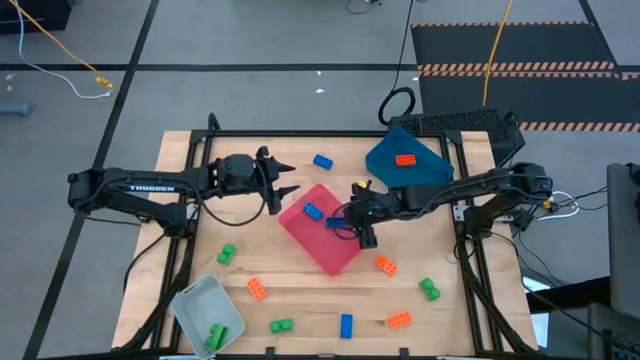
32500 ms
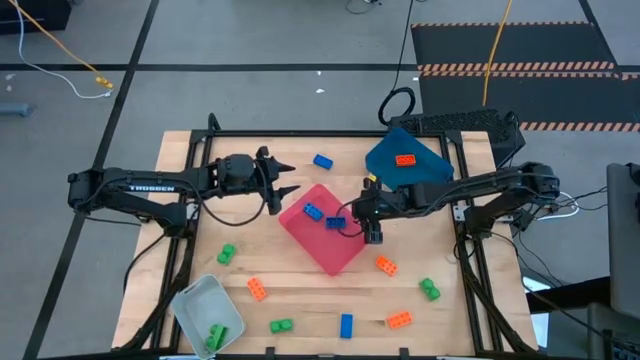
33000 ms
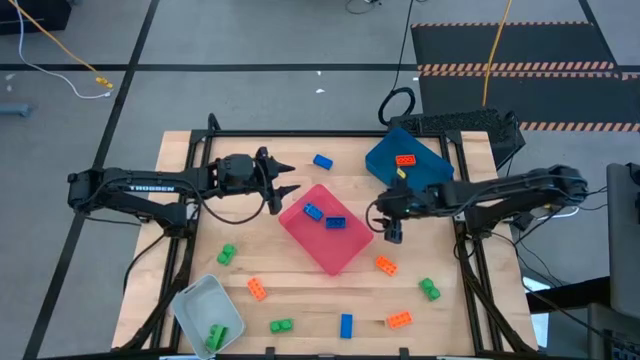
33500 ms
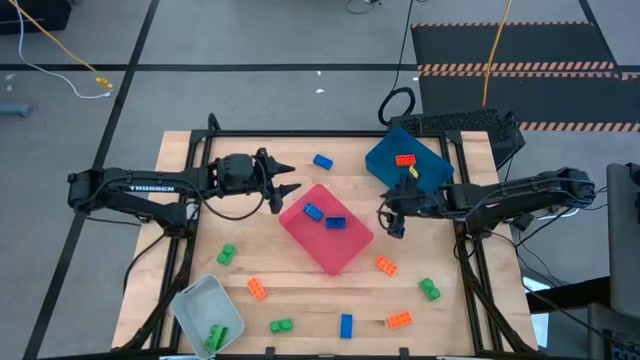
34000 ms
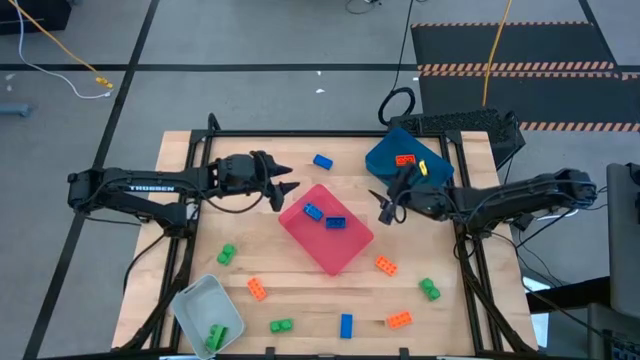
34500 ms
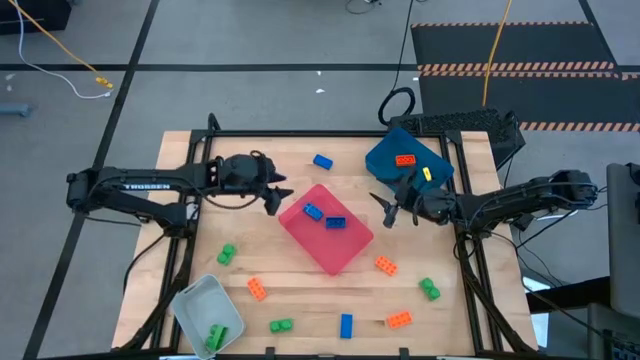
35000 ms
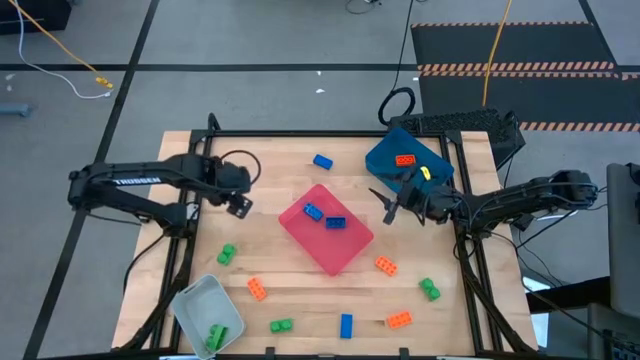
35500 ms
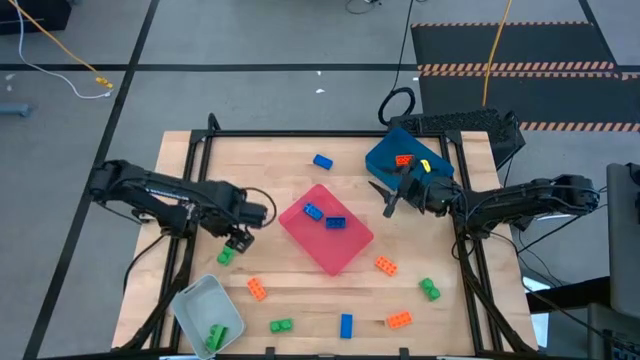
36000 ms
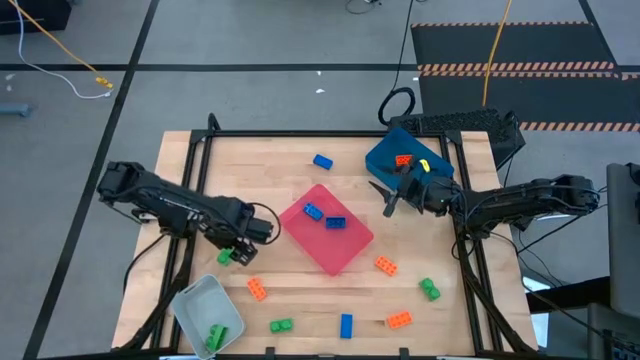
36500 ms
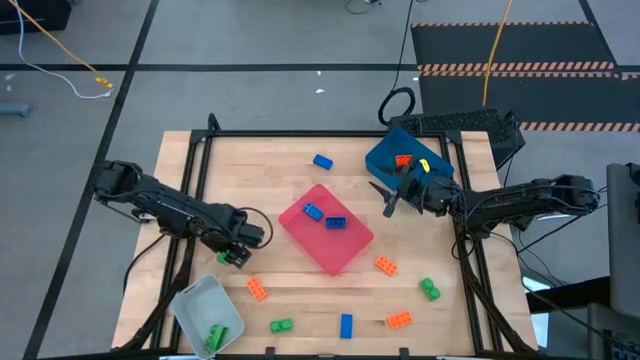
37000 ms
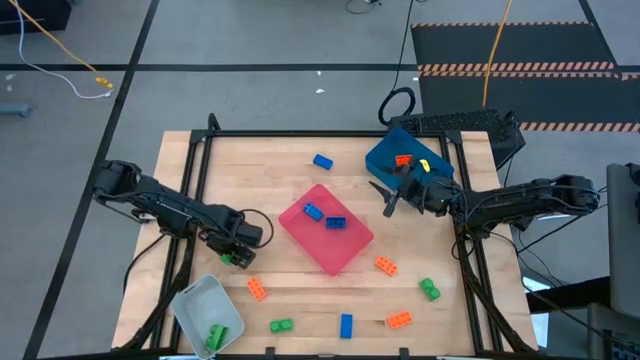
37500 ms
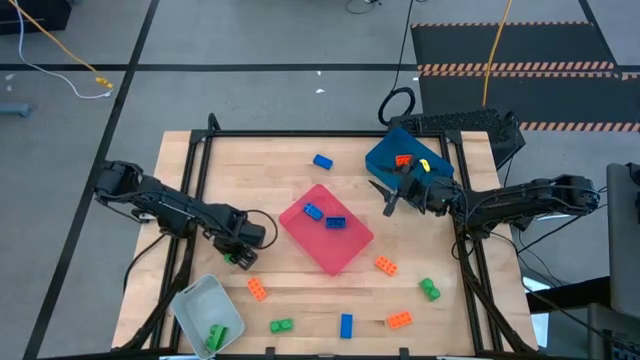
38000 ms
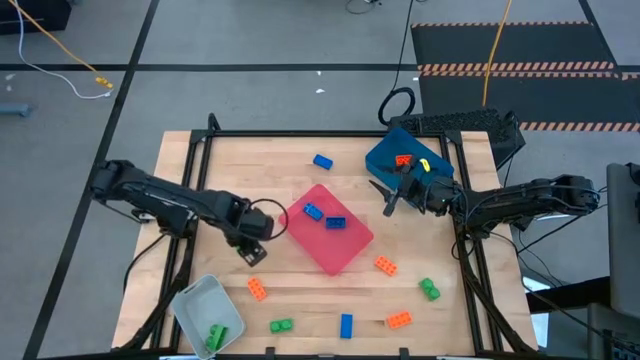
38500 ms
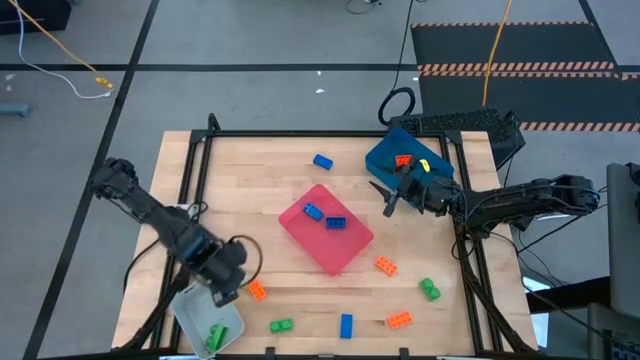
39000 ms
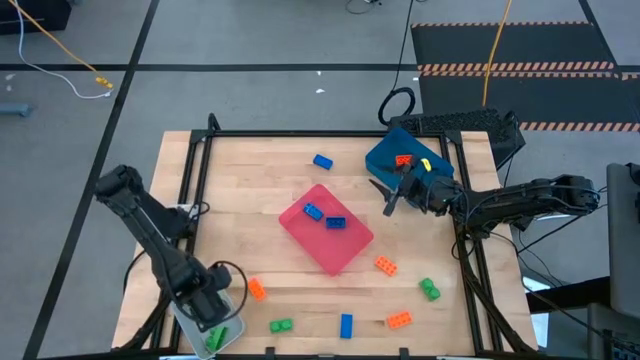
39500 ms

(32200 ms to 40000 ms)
Task: Sort & place blocks by color
Put the green game piece into the gray bin

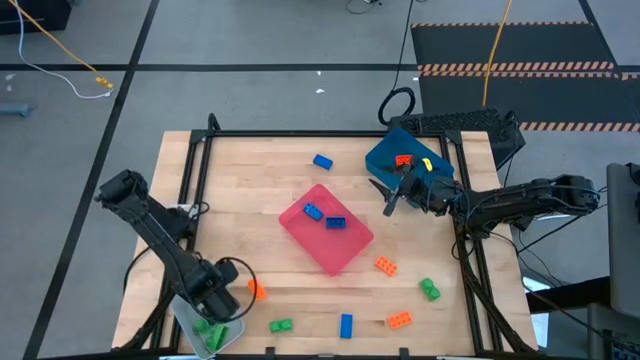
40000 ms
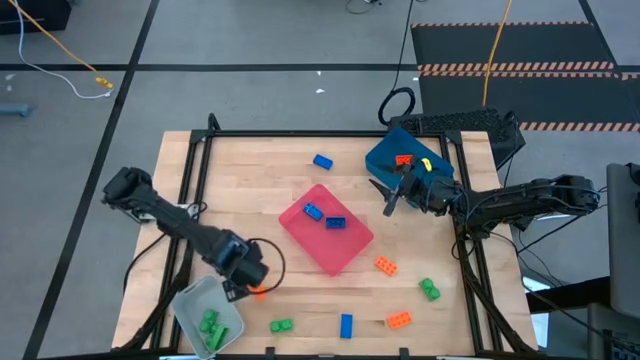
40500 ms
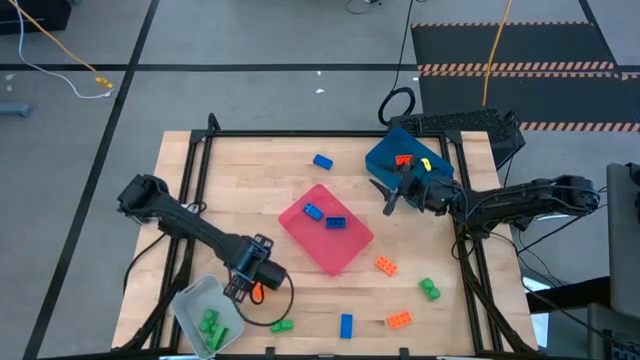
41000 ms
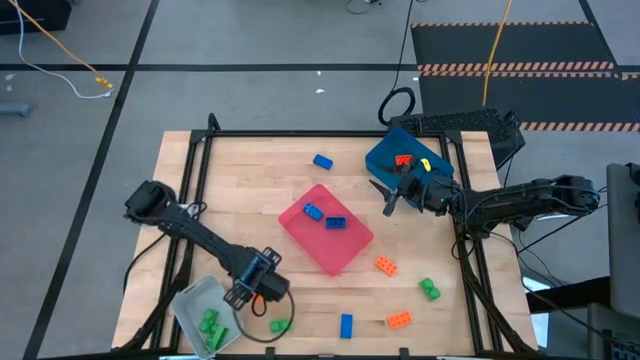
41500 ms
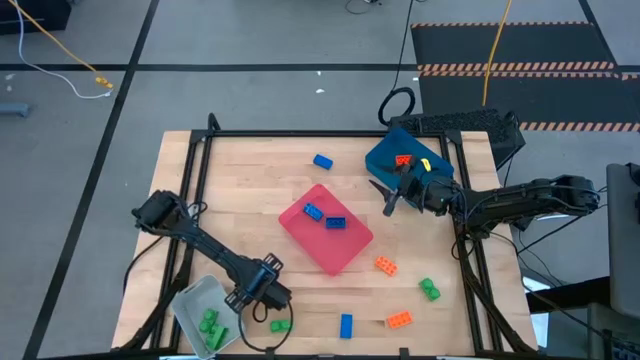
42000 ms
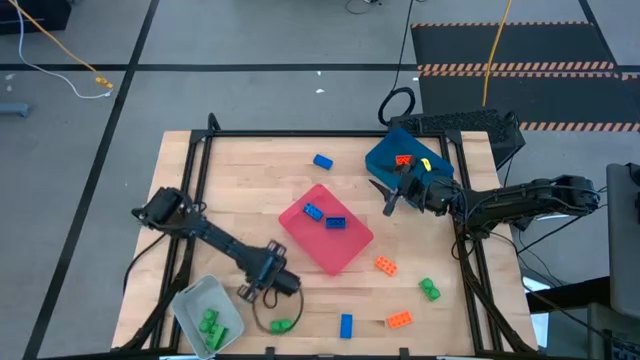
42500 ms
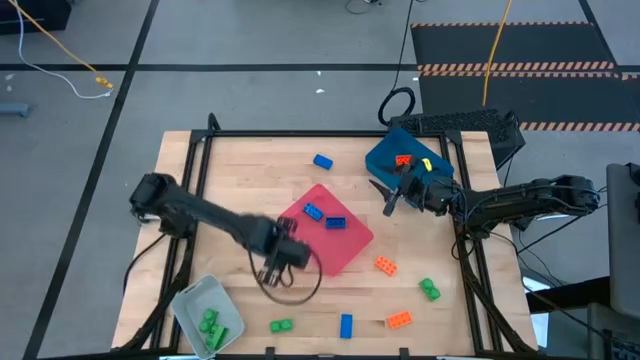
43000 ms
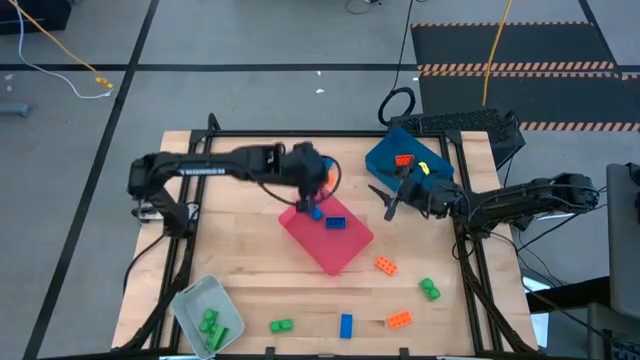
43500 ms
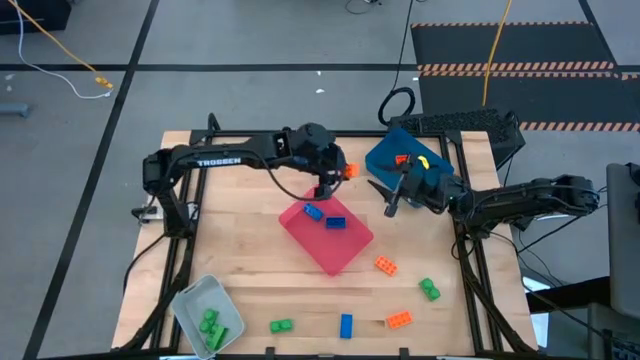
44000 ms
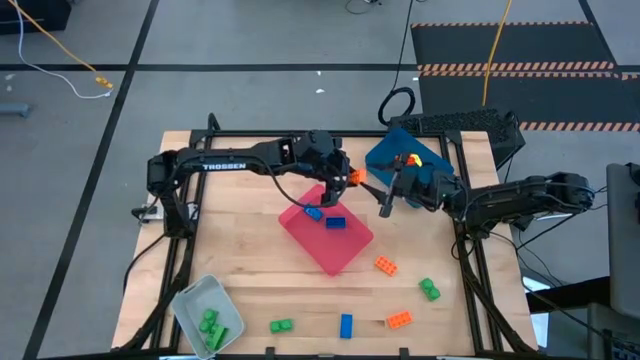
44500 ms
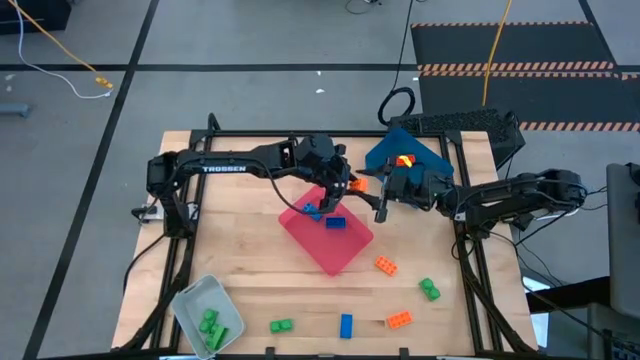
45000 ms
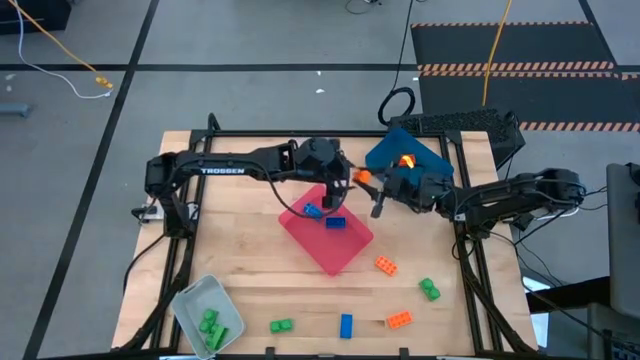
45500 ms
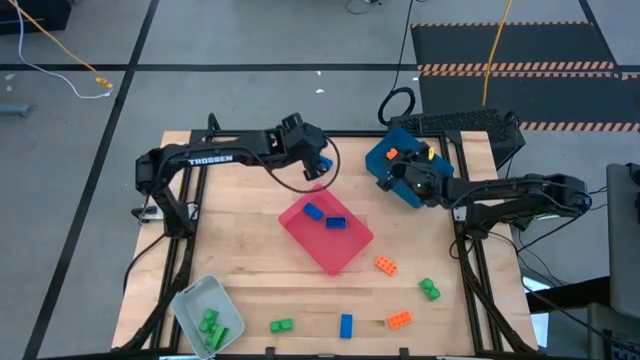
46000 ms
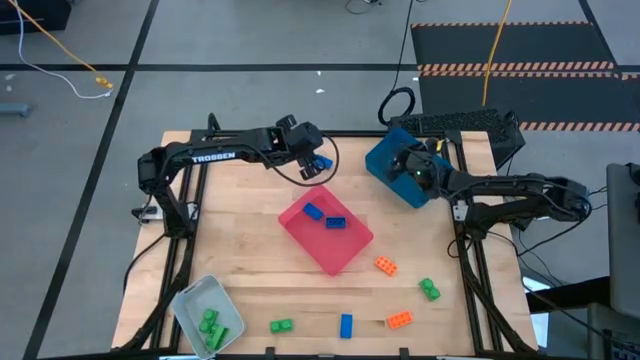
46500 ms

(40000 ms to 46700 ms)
Put the orange game piece into the blue bin

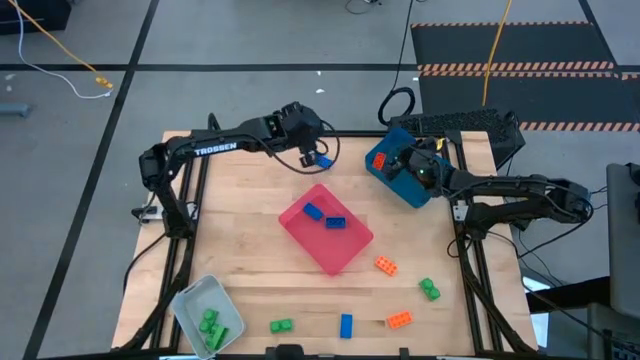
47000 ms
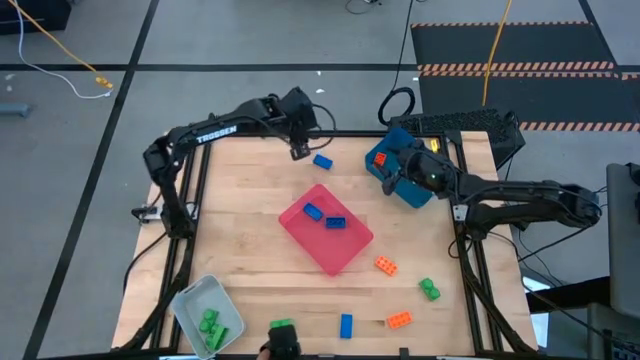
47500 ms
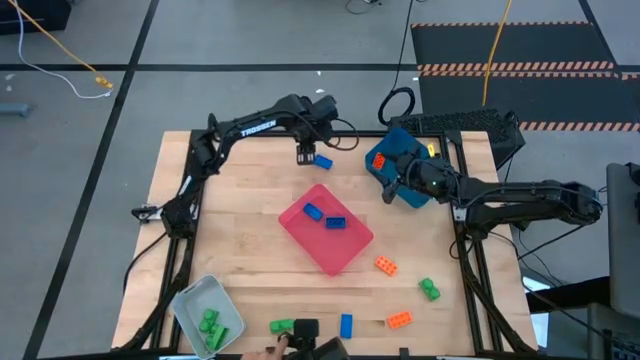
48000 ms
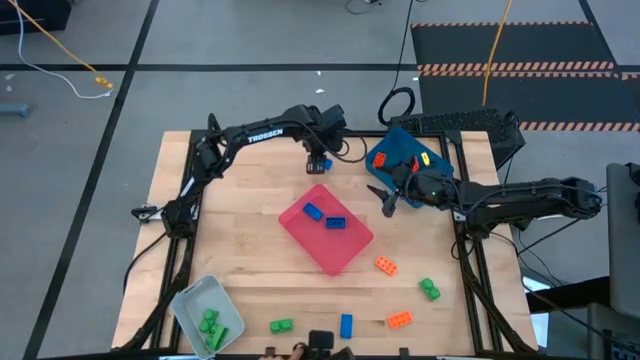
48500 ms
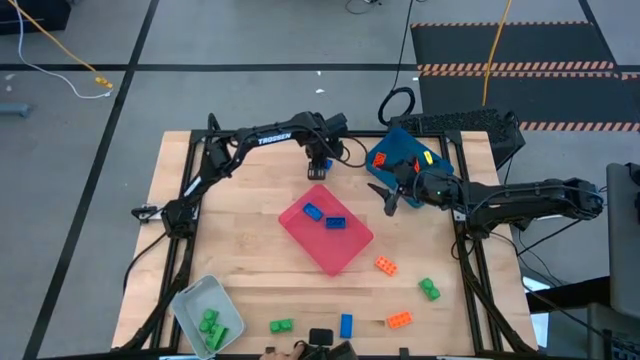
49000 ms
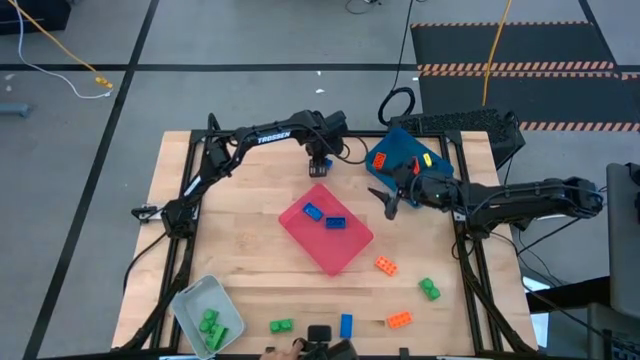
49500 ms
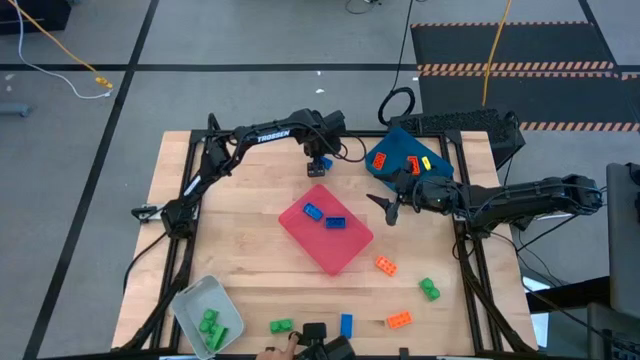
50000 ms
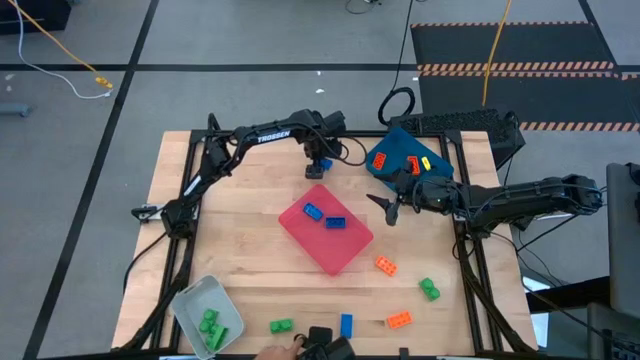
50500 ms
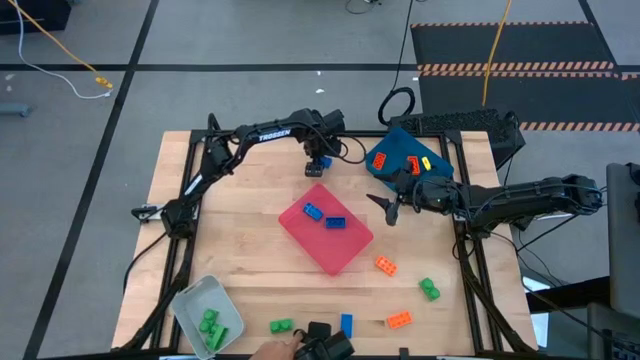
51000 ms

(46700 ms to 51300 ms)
Put the blue game piece into the red bin

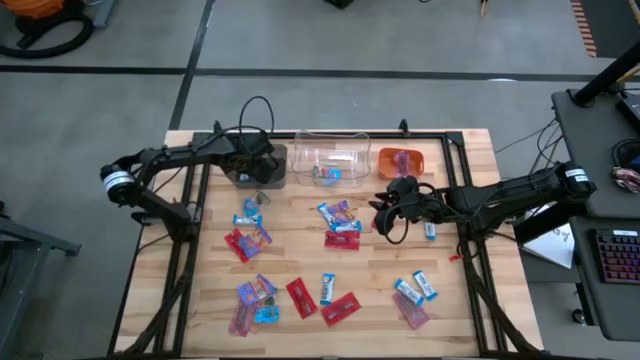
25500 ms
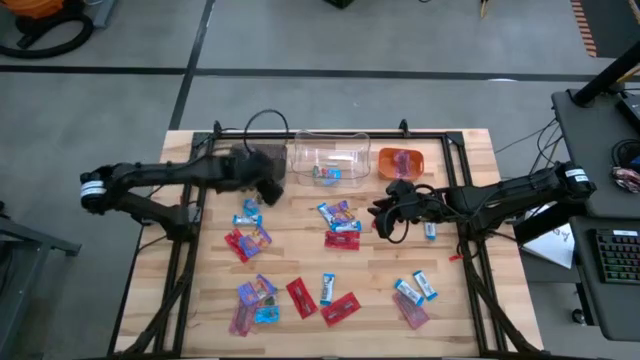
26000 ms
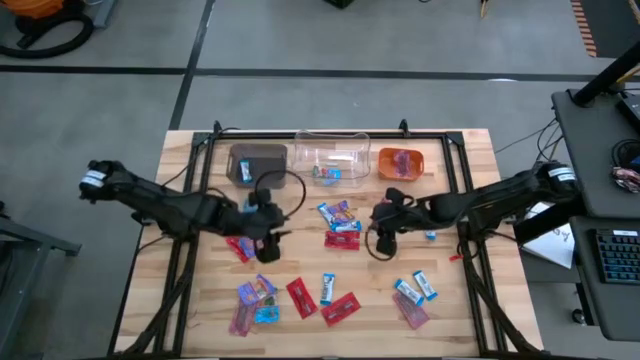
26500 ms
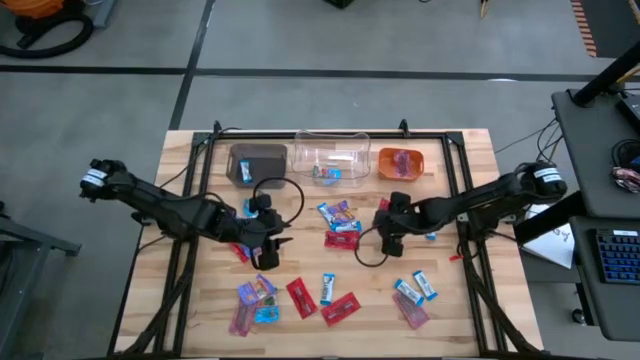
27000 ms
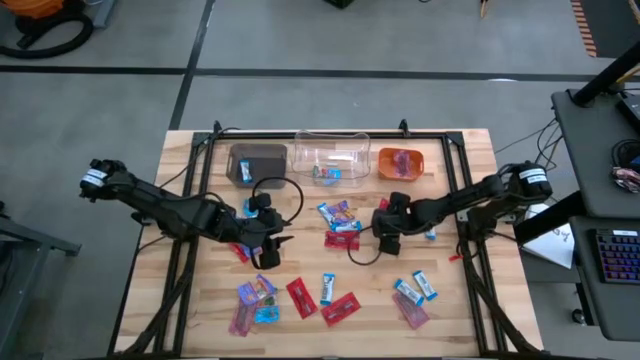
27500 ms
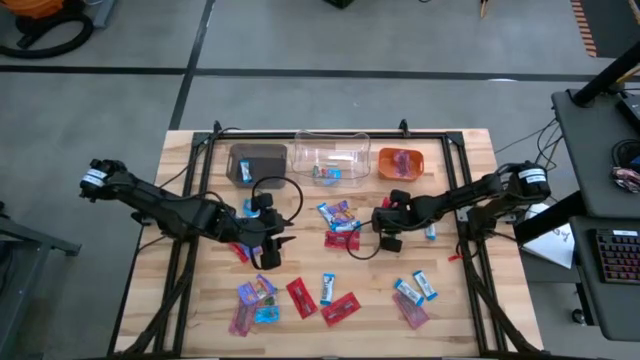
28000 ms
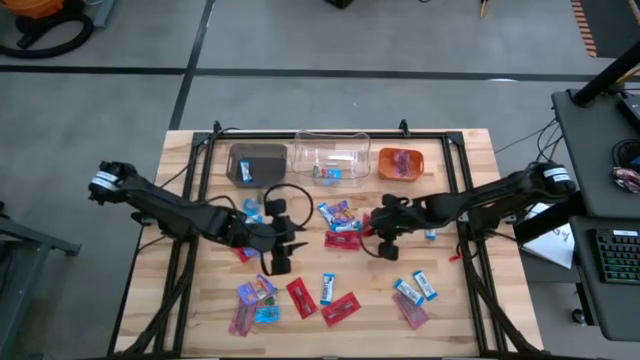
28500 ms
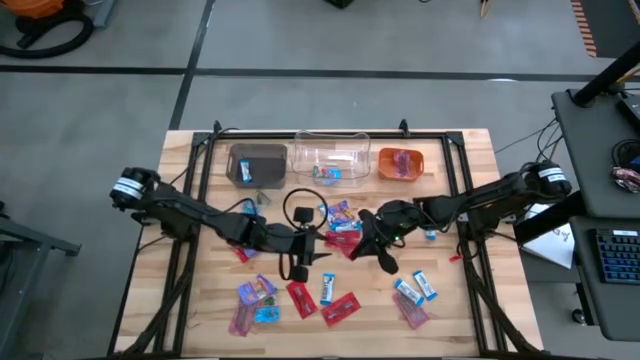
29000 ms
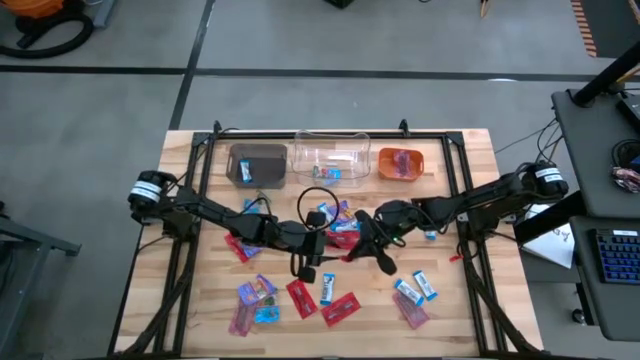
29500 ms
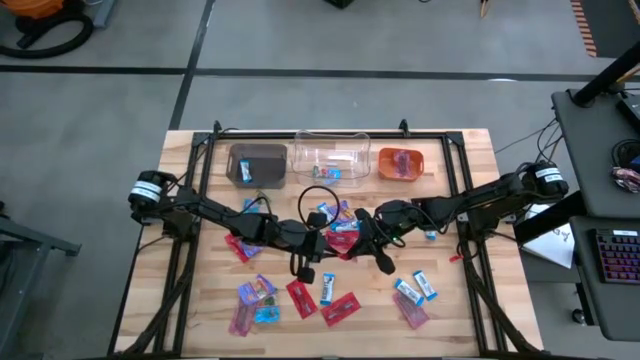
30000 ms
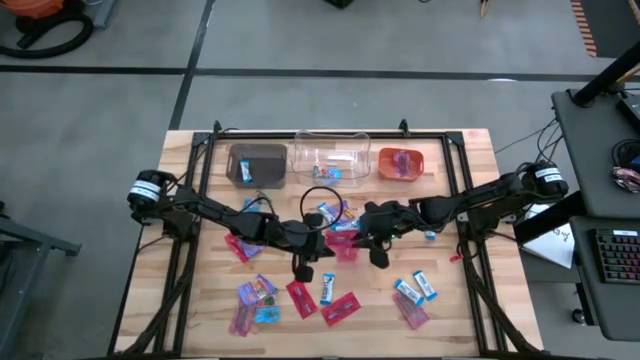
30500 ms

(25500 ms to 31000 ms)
Task: Sort candy
Put the red candy into the orange bin
